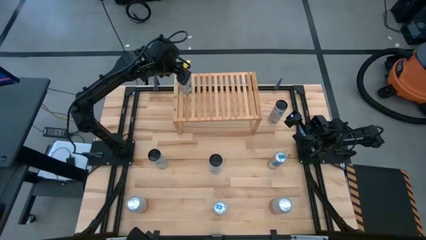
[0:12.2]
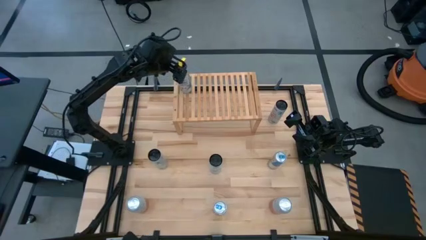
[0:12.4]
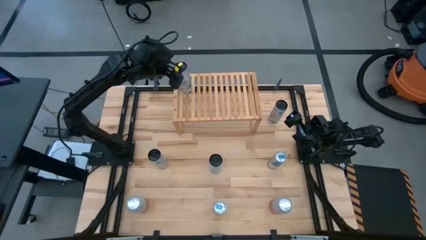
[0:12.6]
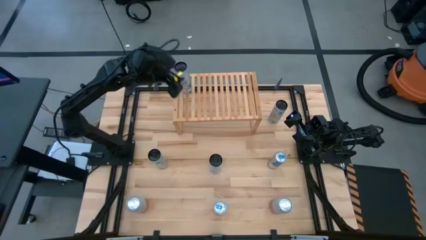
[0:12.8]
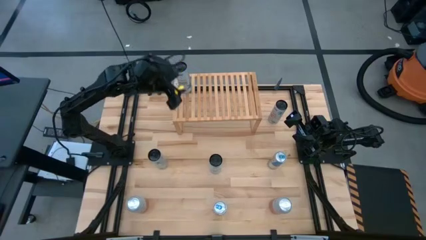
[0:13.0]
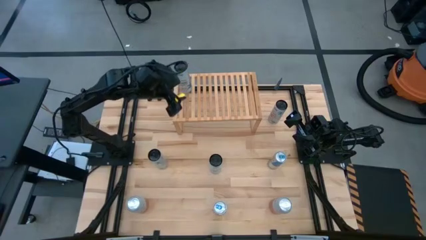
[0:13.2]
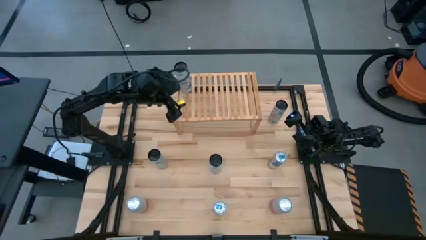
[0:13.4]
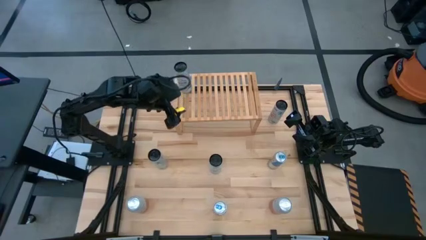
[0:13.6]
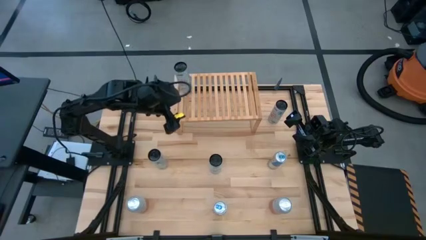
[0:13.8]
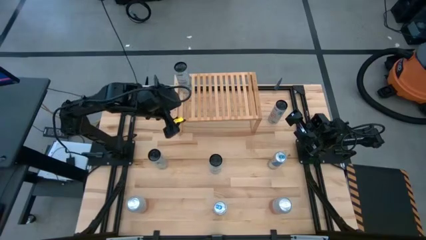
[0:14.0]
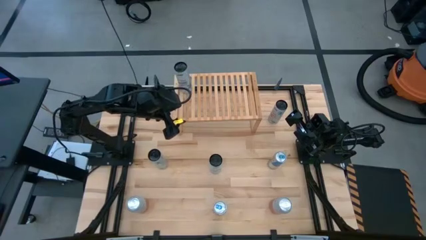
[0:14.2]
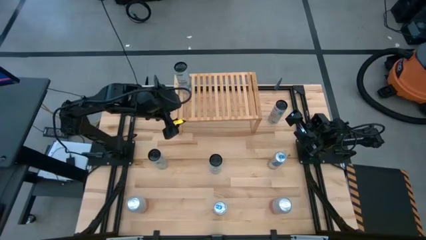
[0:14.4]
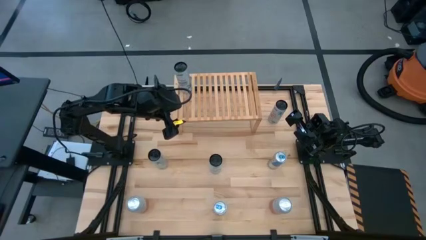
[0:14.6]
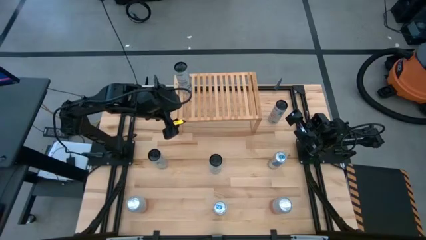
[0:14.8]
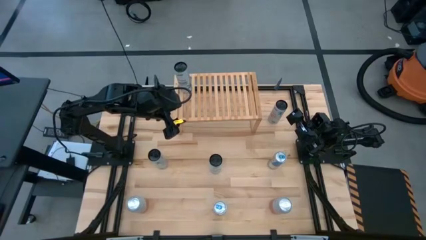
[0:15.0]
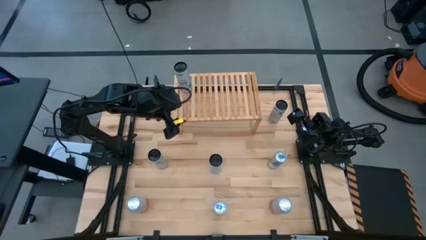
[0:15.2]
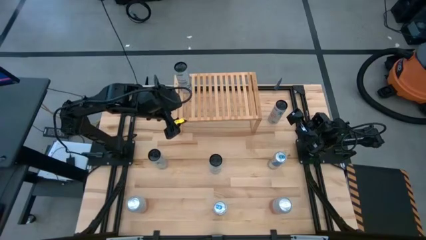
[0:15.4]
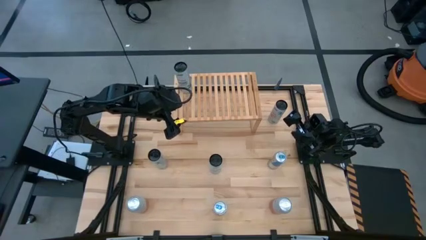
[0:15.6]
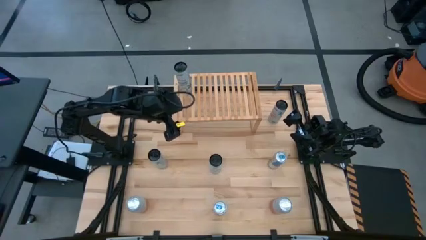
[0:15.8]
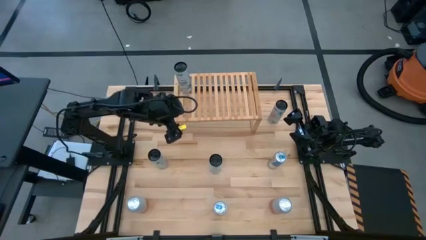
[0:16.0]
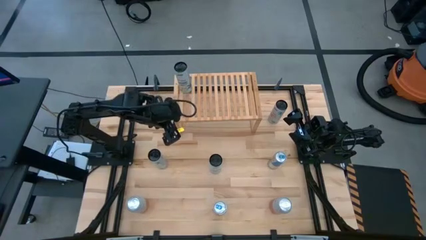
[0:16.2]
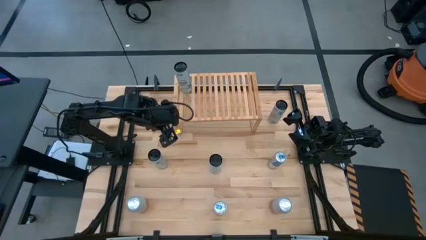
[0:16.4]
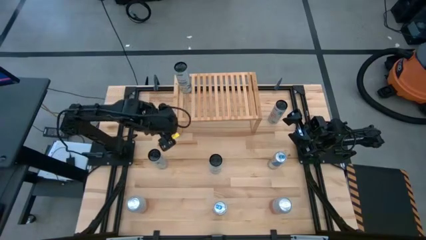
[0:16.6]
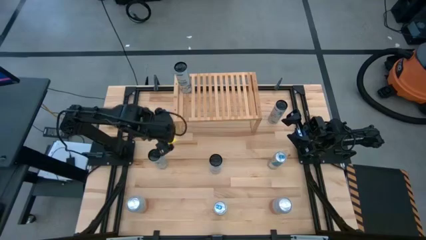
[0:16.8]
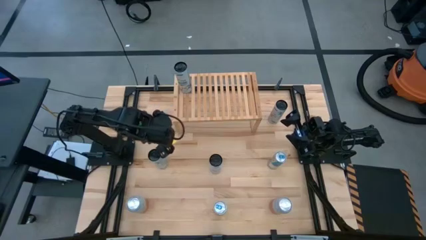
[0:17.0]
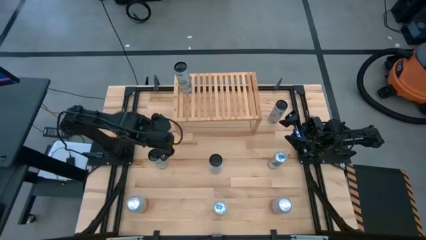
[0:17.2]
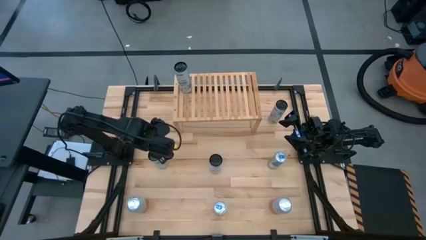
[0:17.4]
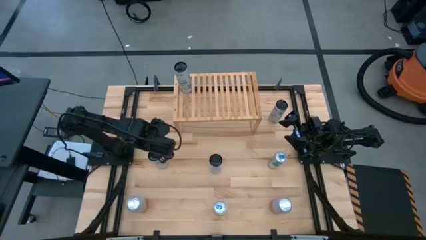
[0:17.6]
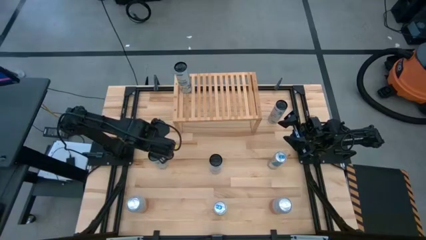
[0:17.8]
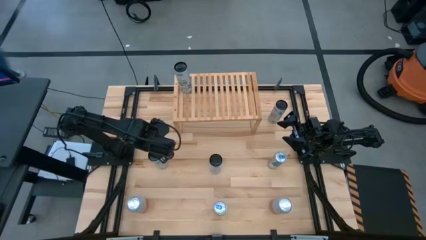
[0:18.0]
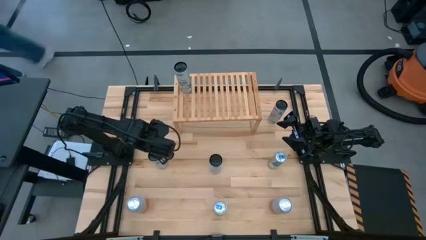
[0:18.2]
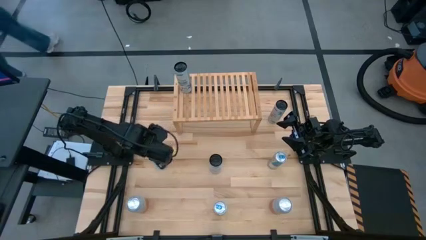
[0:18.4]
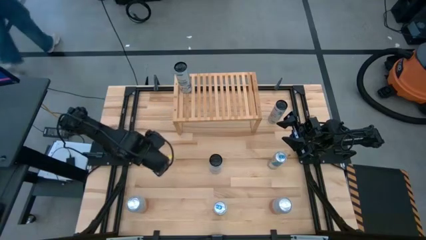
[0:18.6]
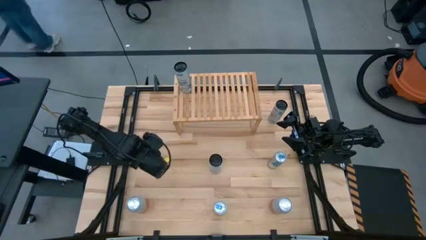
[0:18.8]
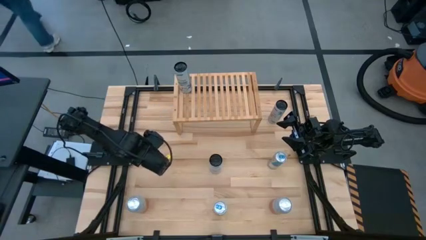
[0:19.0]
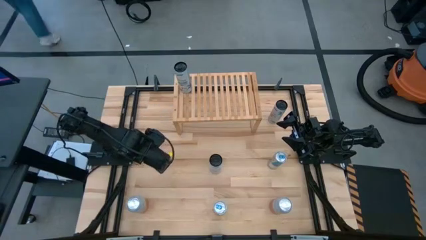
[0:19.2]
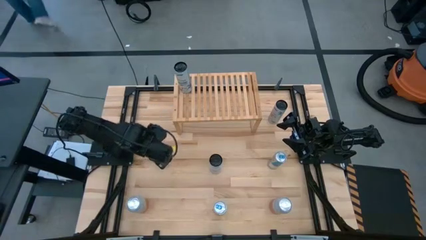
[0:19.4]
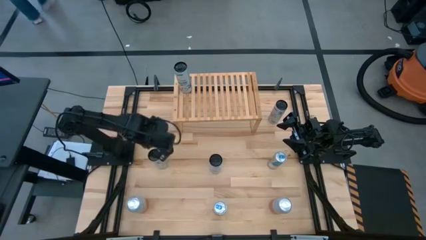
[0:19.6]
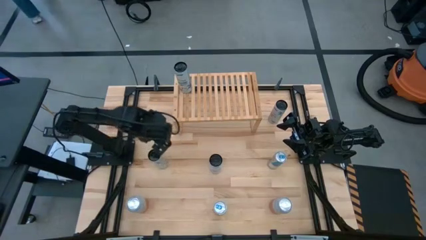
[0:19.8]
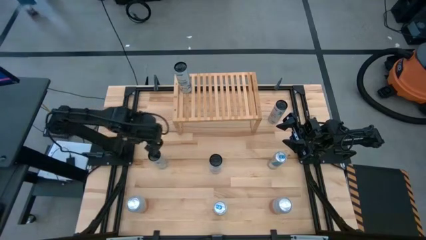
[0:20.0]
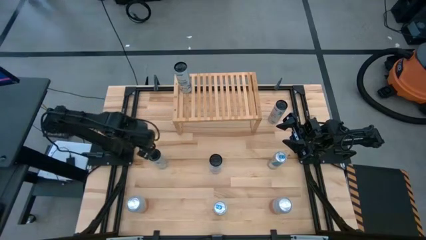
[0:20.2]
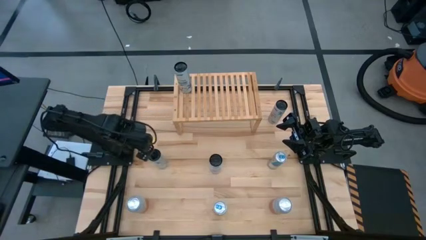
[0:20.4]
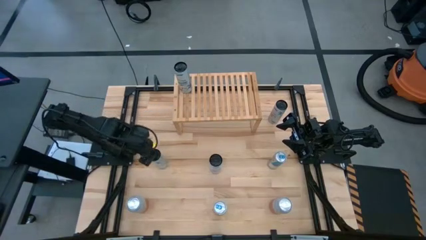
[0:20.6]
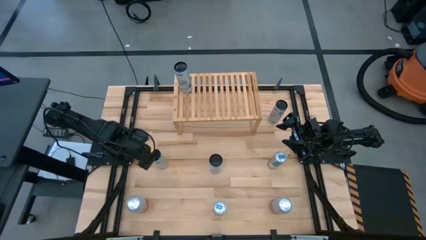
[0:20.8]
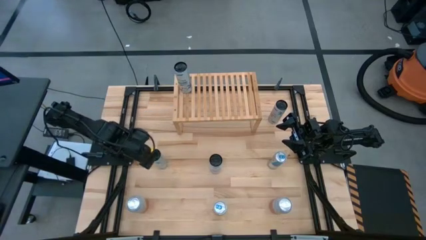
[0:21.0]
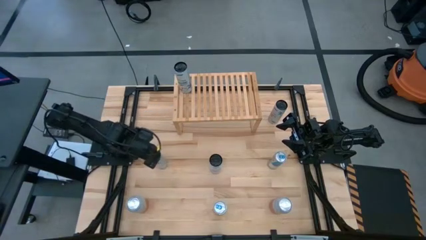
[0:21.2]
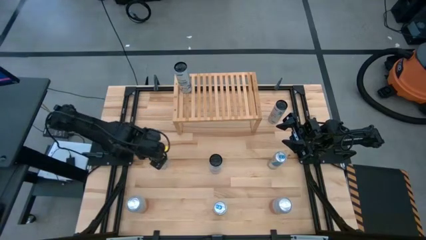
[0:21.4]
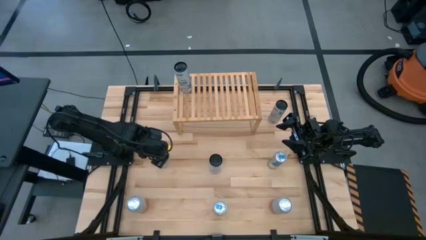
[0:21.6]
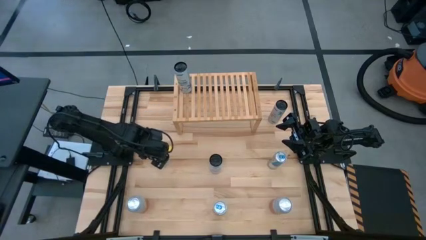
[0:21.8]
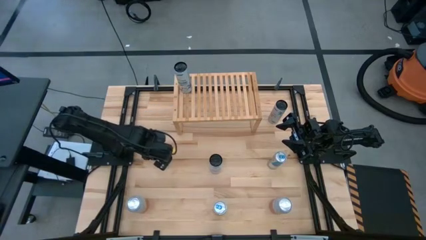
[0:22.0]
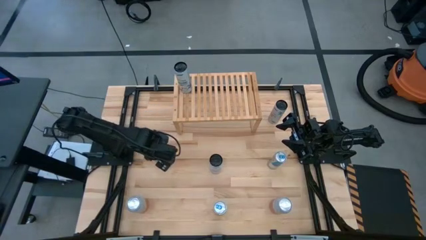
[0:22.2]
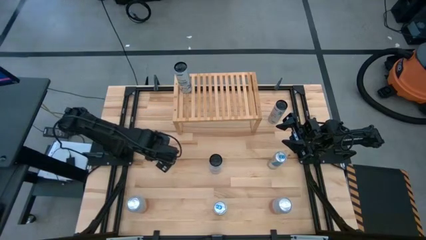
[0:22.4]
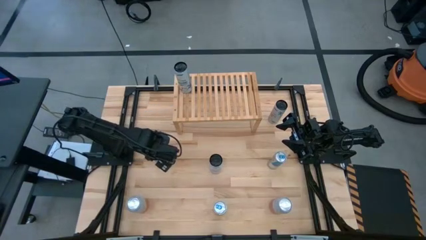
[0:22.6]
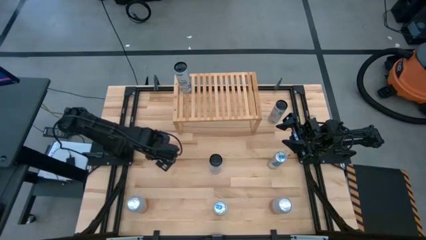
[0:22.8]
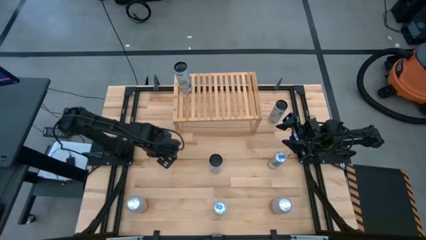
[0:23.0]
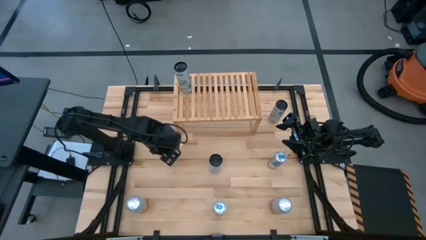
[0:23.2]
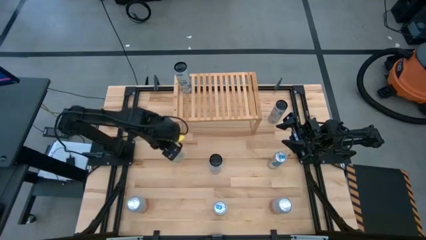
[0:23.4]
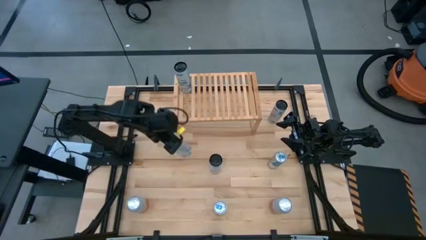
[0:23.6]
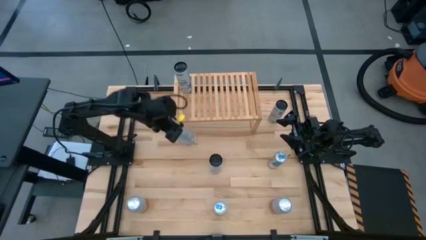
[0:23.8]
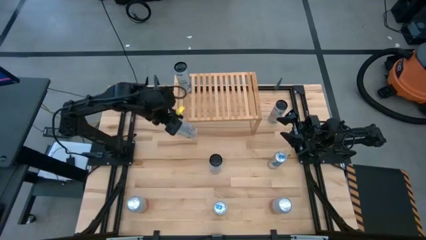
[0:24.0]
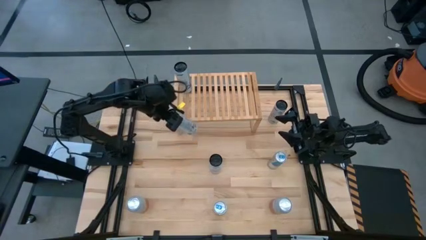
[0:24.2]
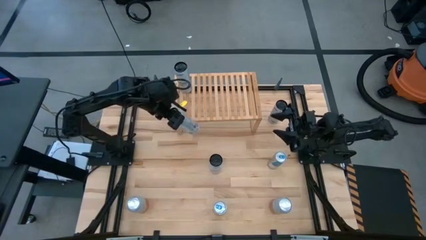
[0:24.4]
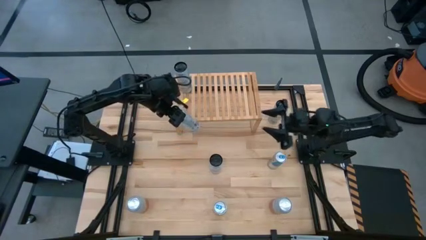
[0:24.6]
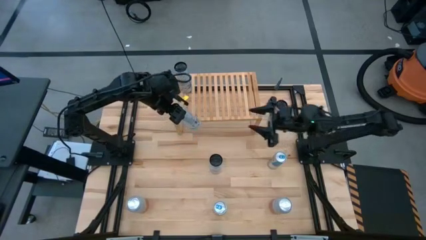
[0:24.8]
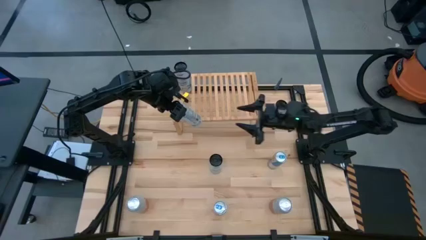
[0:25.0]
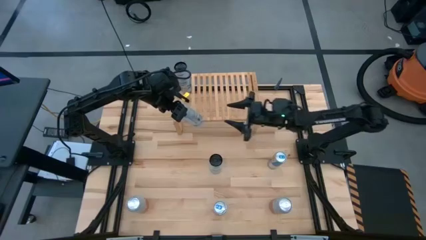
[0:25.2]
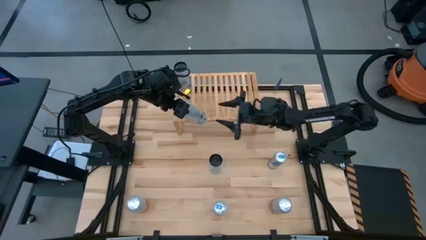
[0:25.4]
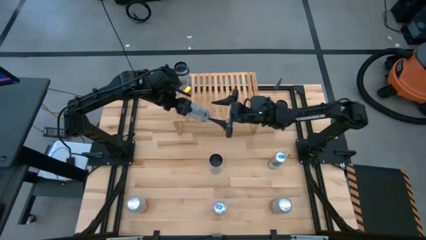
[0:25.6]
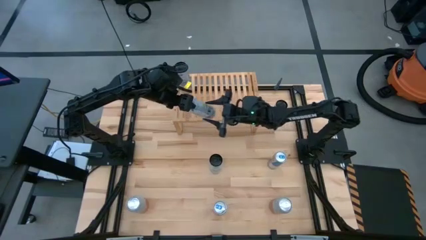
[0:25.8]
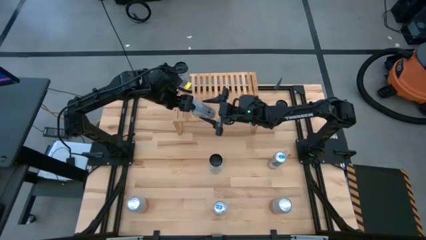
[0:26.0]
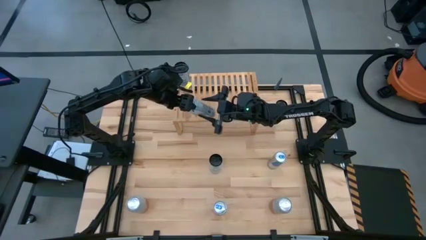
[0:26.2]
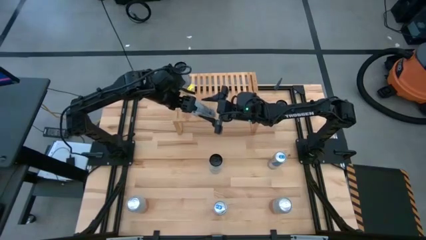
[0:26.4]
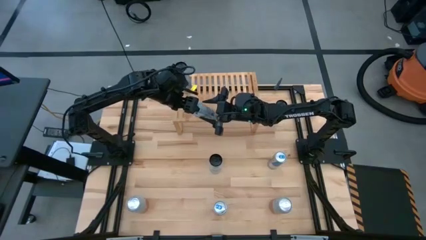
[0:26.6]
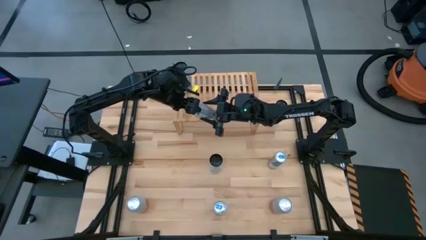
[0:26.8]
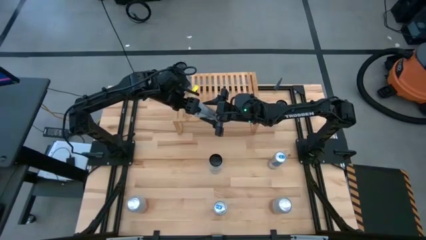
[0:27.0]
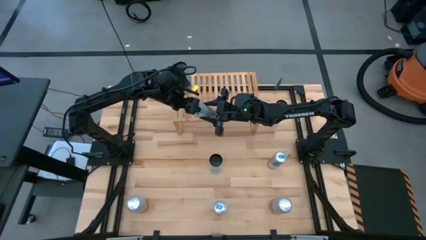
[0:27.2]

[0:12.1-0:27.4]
Task: Place canned beverage on shelf
Put the white-pink soda can on the shelf aligned with the other white-pink soda can
